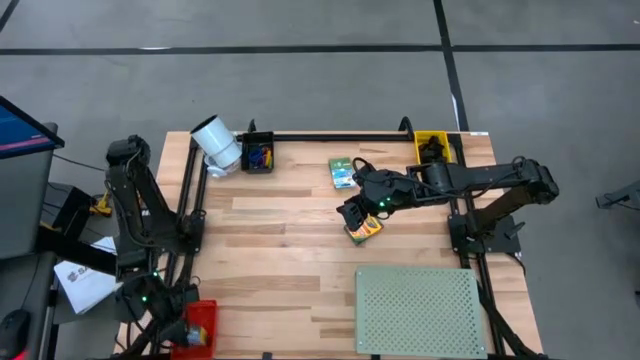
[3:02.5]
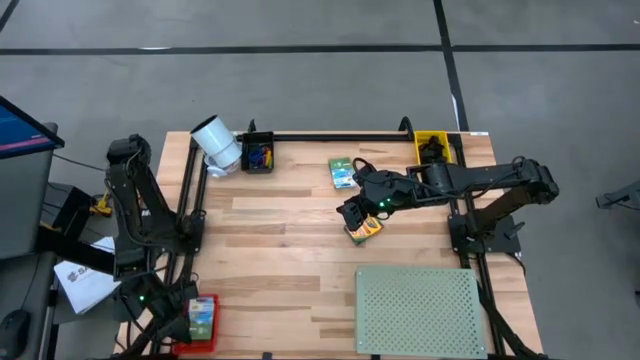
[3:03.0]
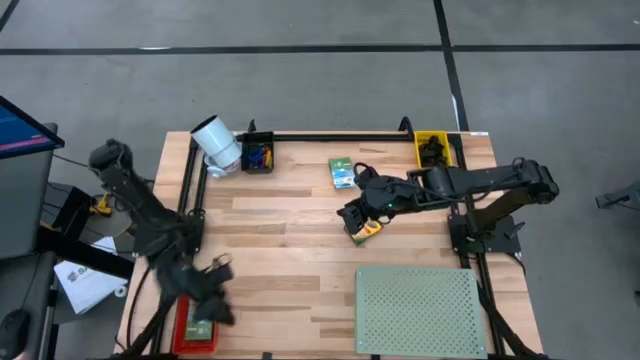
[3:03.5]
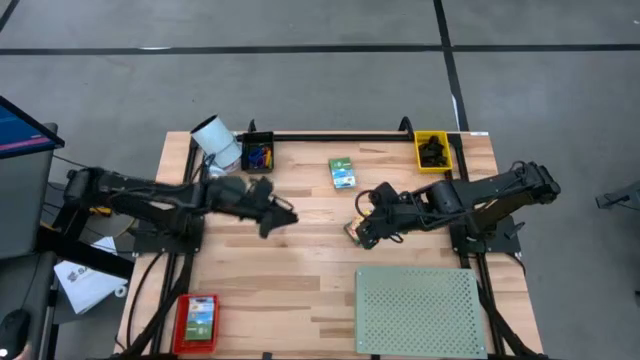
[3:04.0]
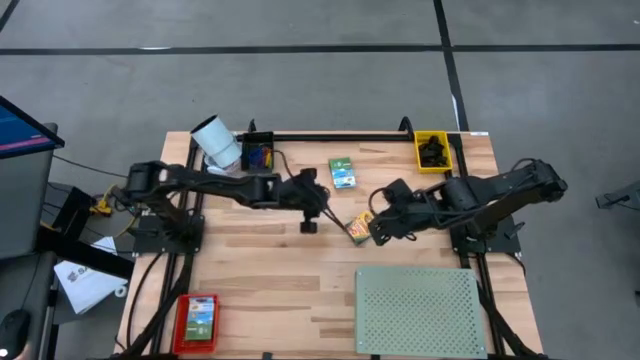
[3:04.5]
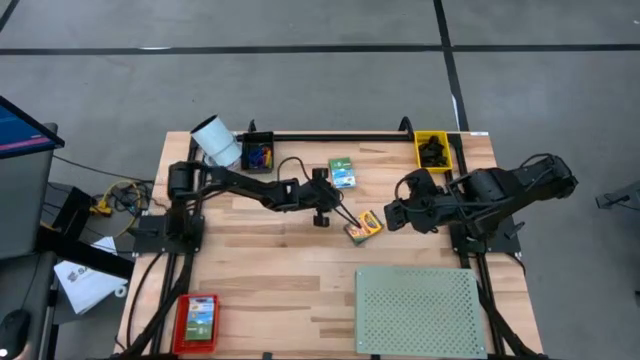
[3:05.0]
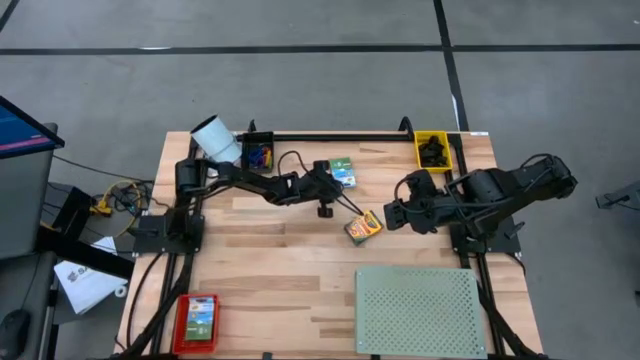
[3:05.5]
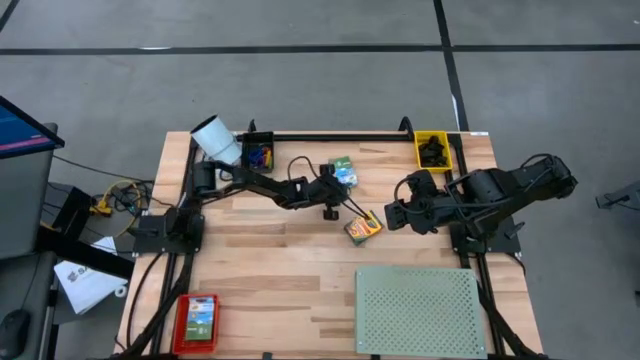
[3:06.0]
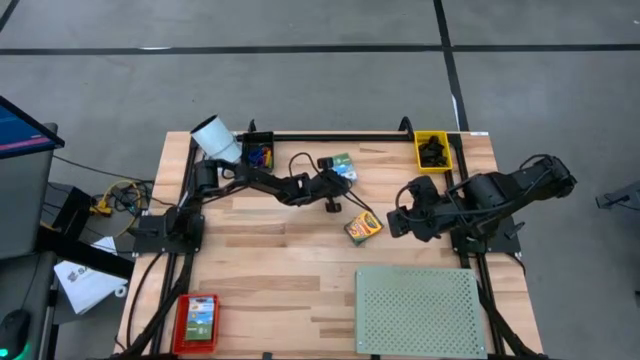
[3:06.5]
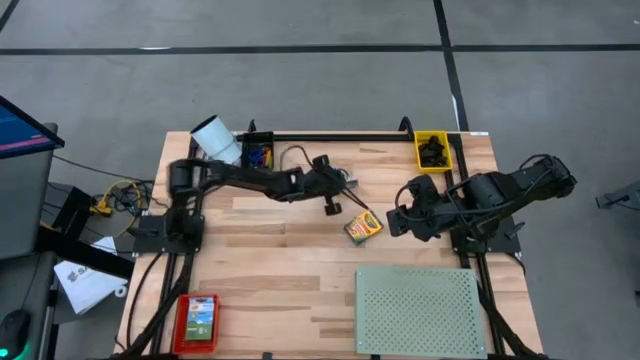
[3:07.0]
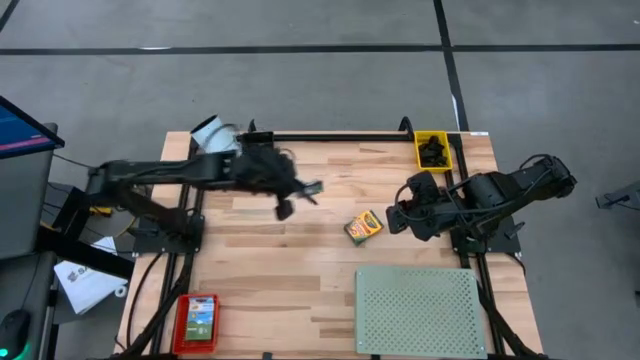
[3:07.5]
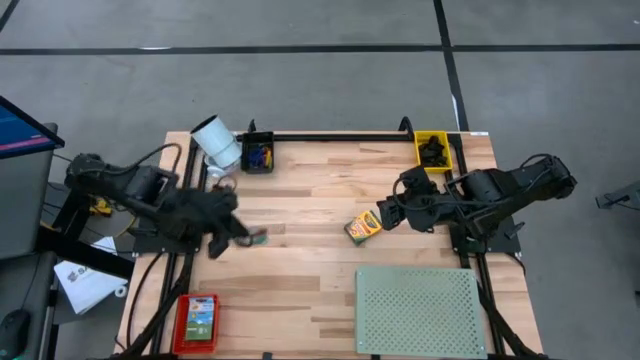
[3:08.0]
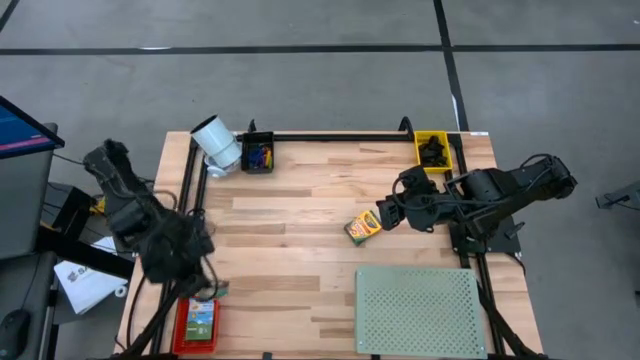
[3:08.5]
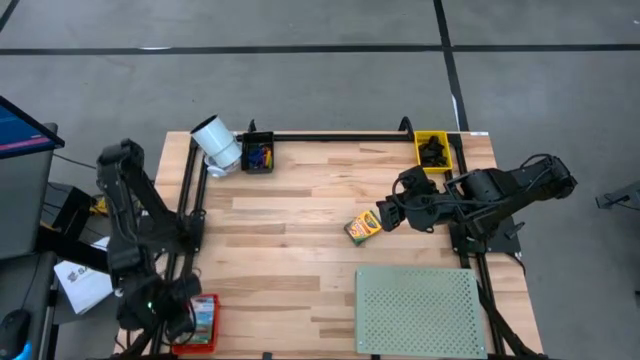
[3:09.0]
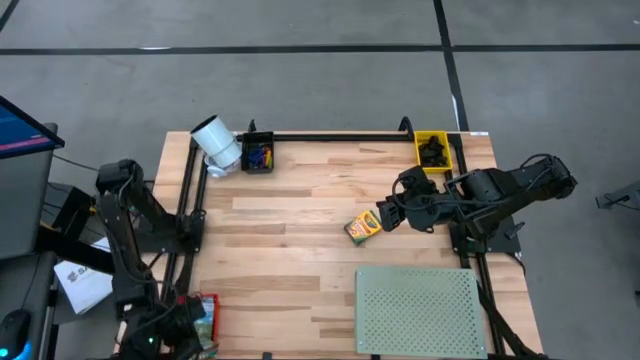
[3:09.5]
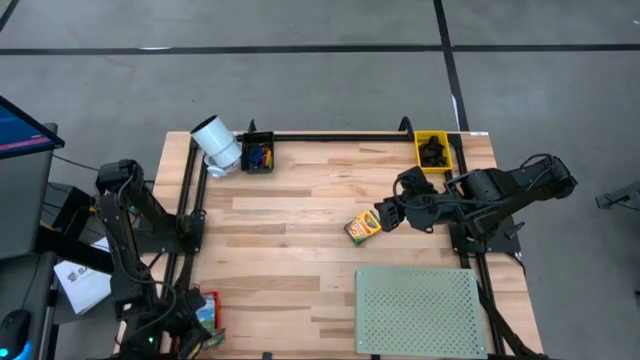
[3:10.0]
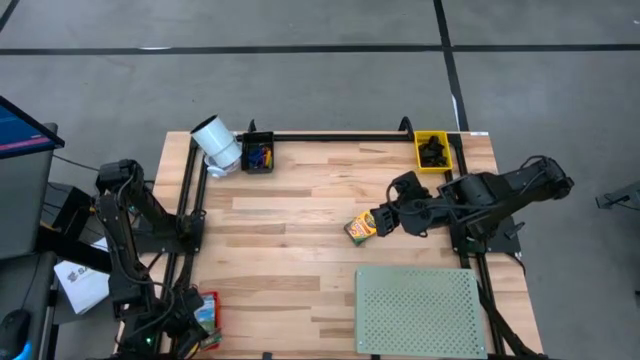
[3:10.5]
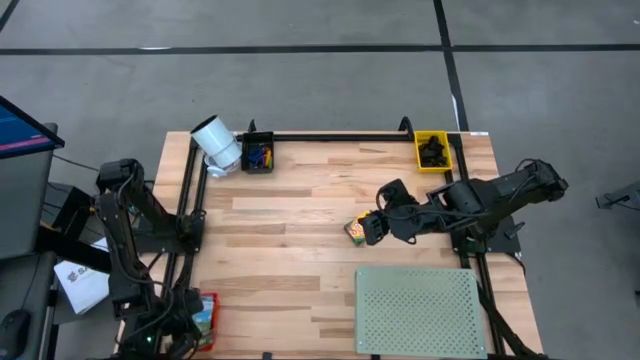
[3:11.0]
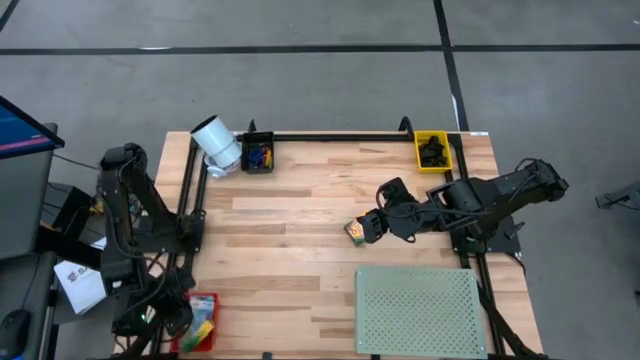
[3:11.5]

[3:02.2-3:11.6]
Task: Pick & Place Office Desk Supplies
Put the green crayon box into the orange bin

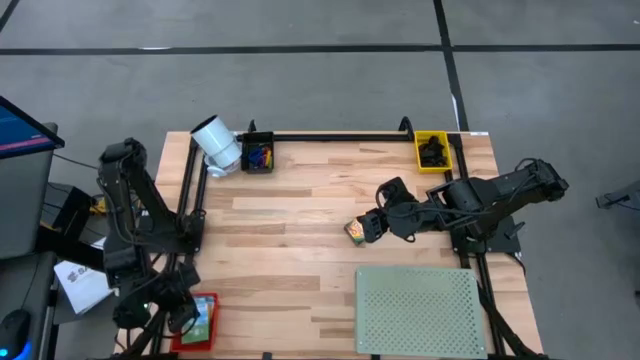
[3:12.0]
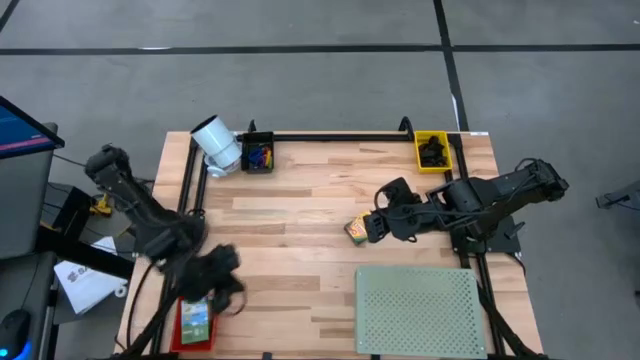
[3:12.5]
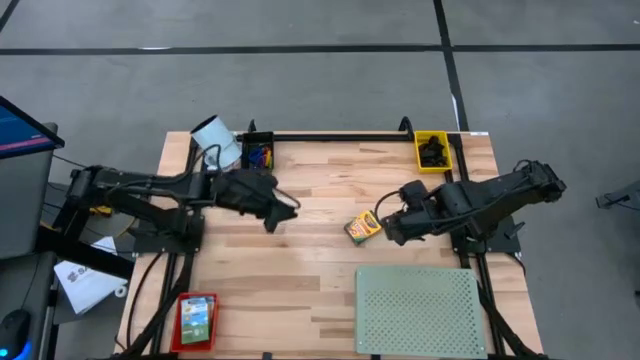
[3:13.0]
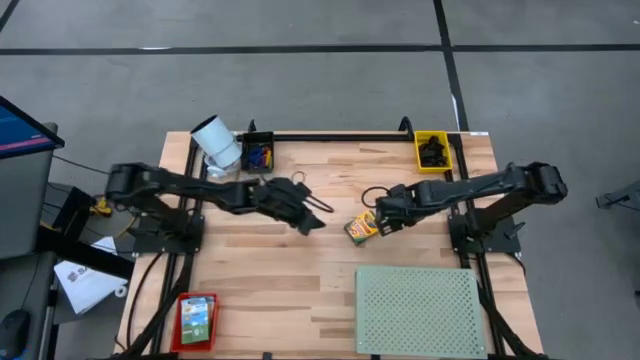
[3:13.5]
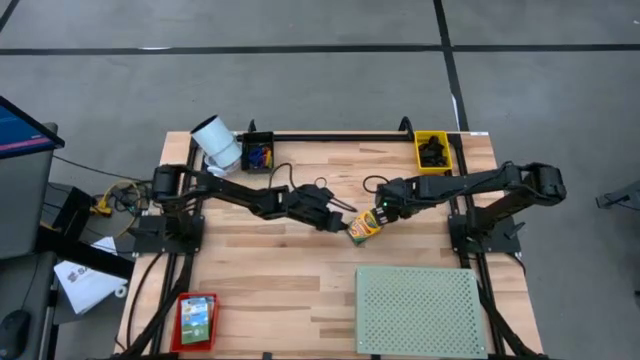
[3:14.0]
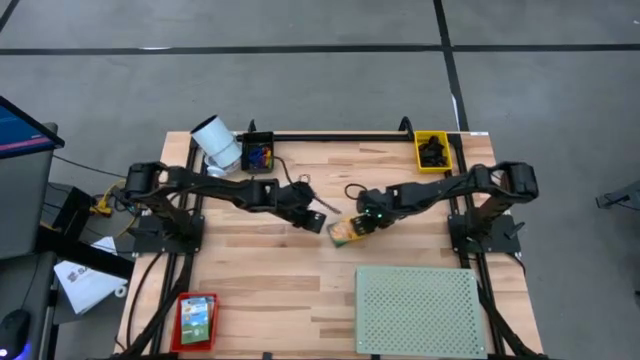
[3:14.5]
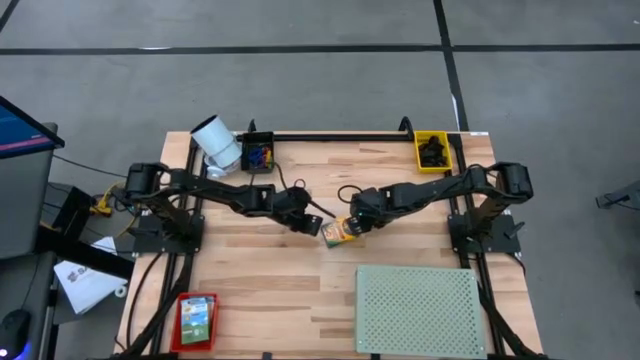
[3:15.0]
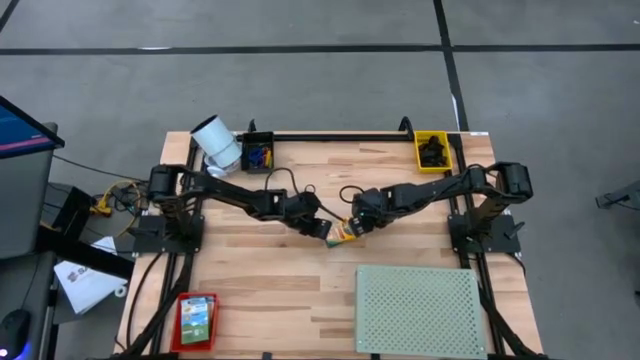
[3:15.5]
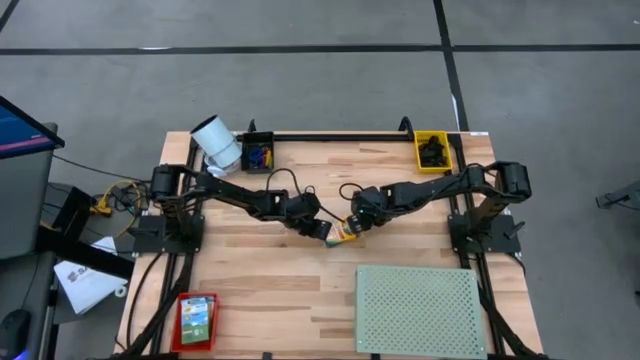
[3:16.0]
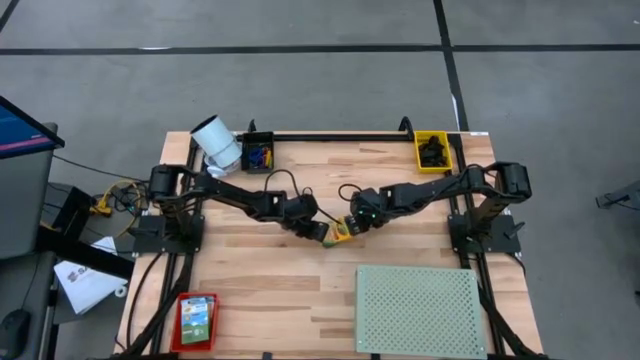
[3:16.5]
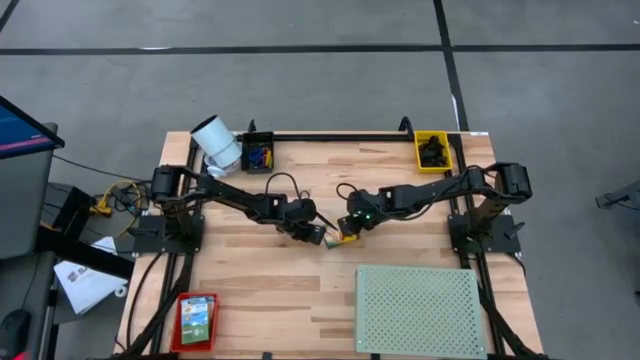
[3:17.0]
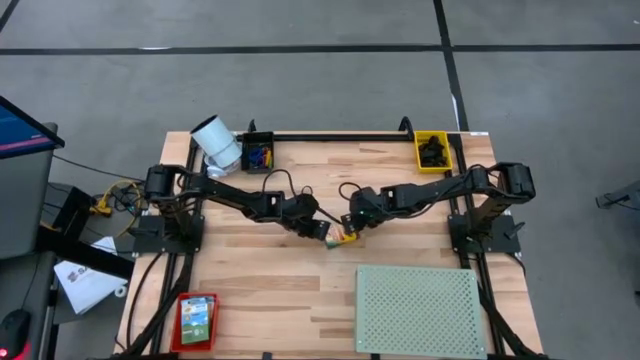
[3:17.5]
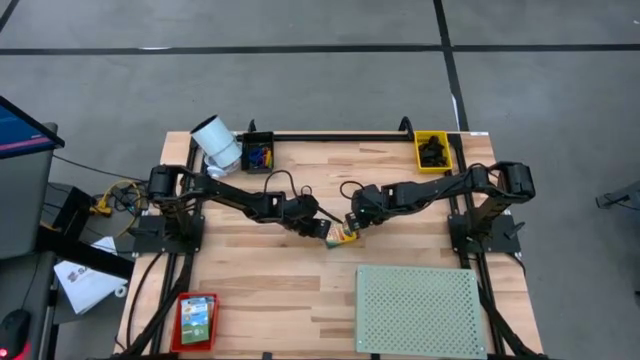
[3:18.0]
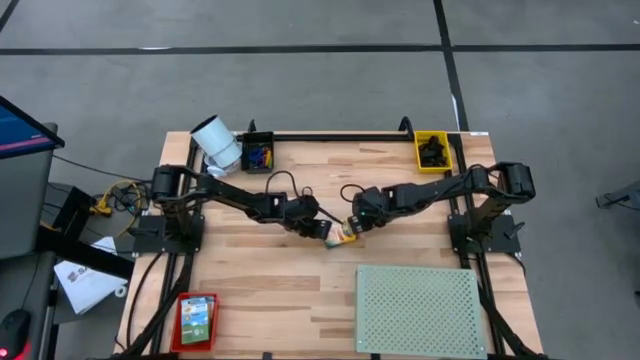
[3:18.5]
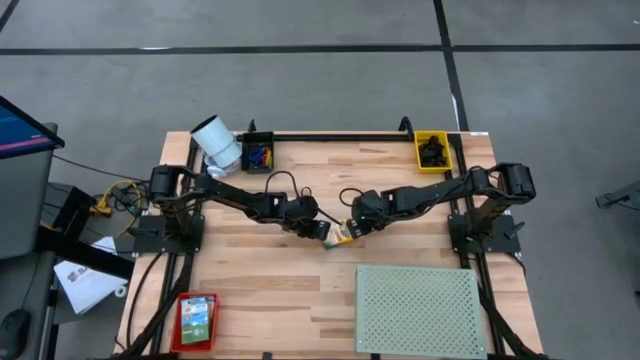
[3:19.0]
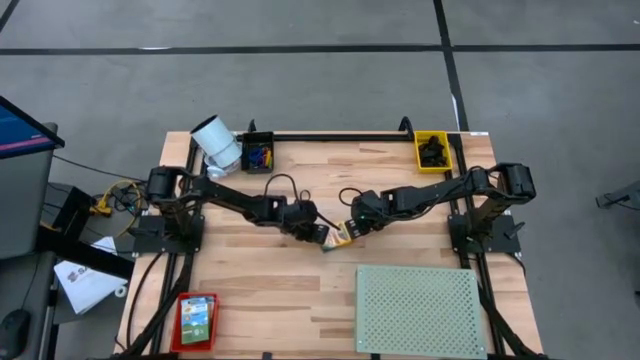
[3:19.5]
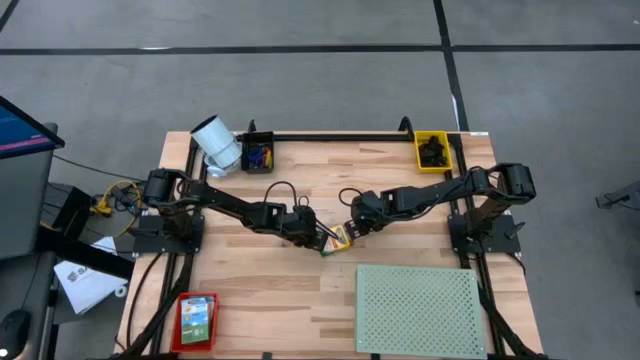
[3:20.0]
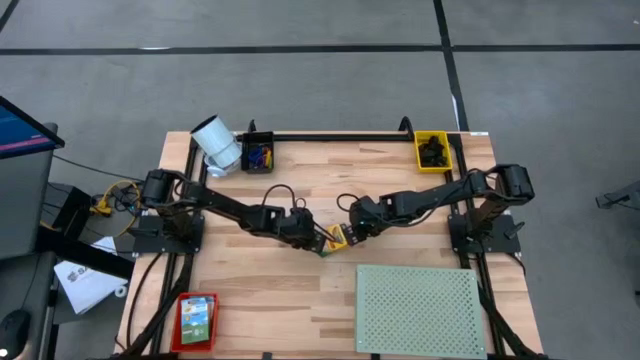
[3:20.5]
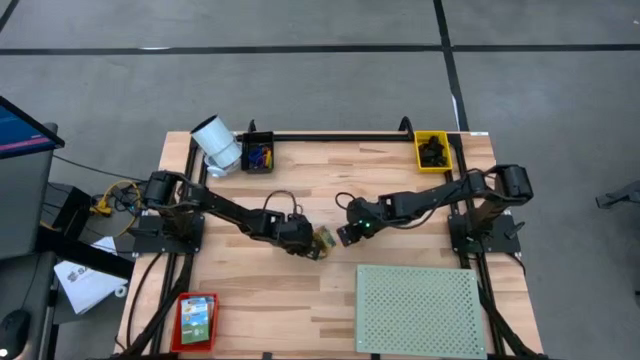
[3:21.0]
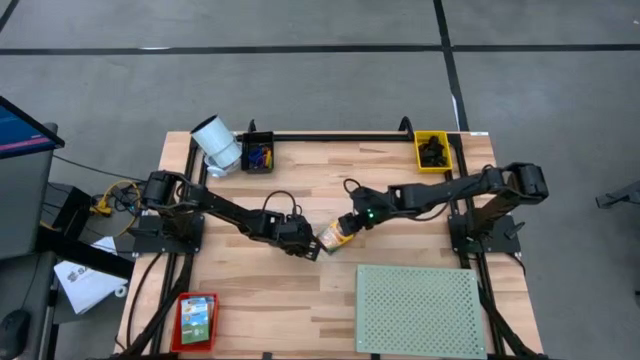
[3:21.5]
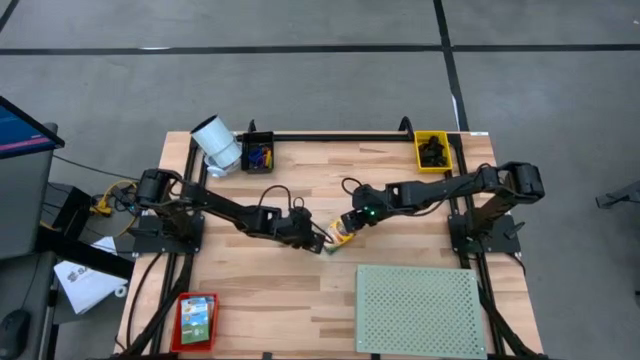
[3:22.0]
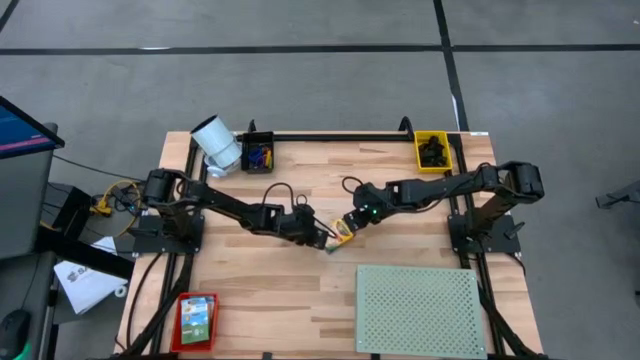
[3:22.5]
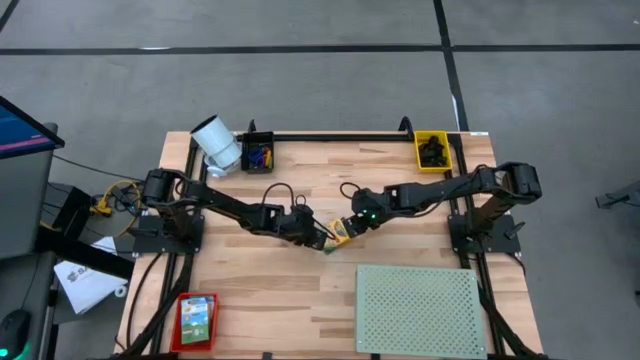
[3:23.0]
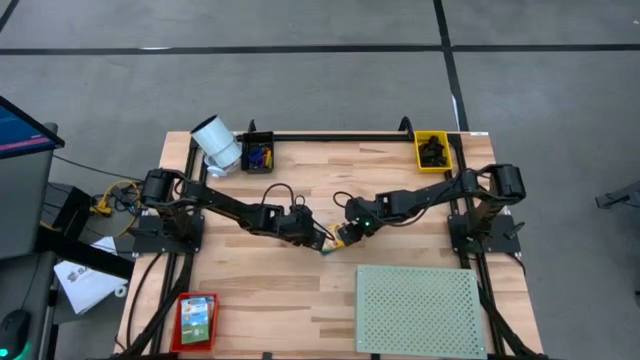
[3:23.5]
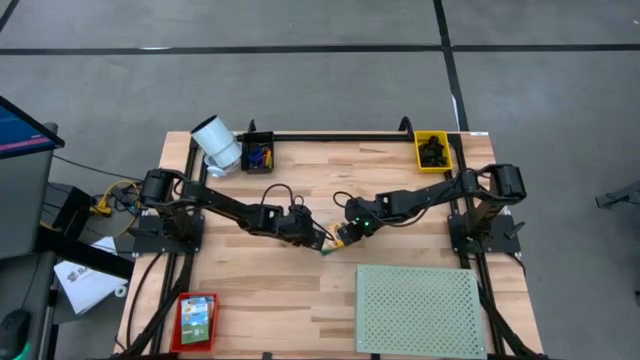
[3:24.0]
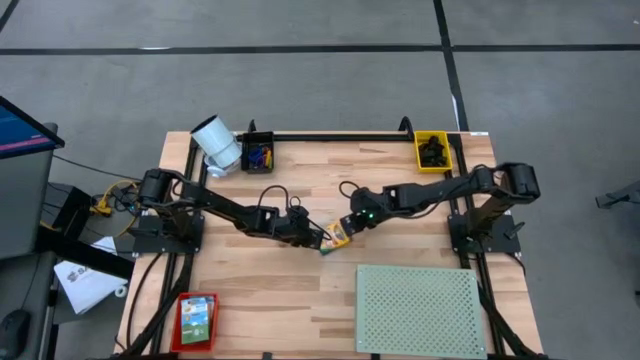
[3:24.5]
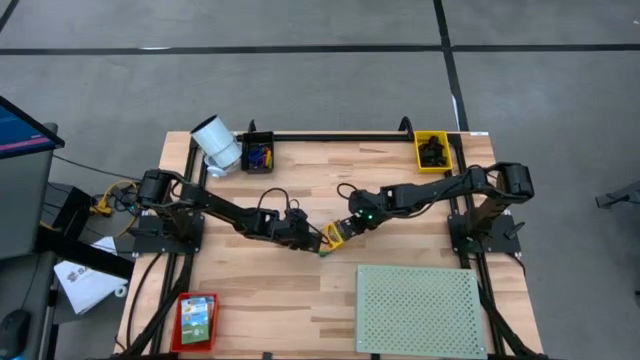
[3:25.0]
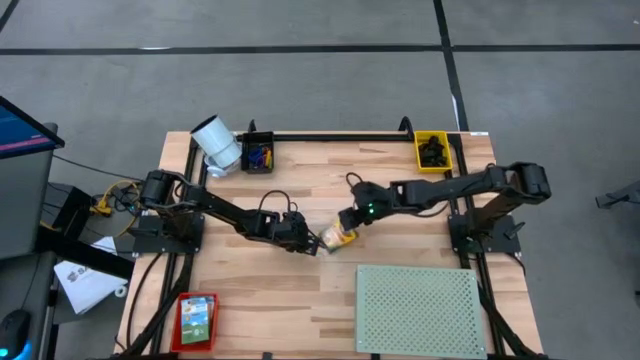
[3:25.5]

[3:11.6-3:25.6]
Put the green crayon box into the orange bin
